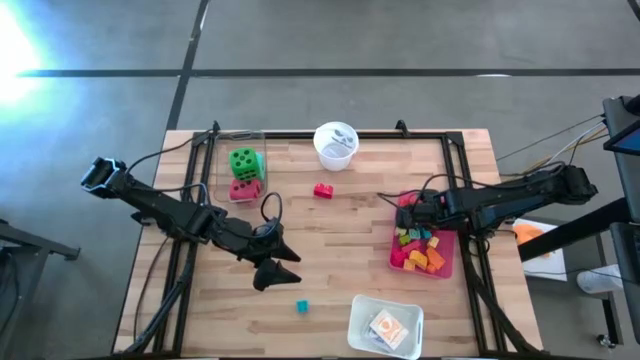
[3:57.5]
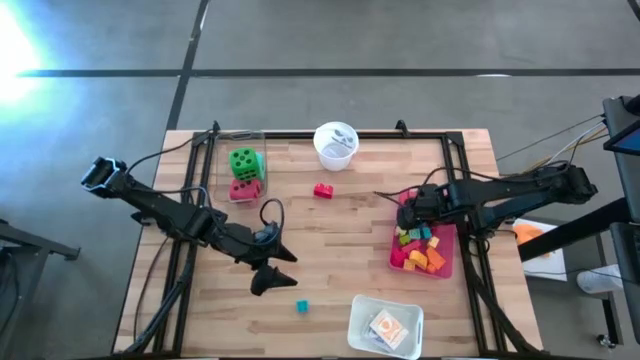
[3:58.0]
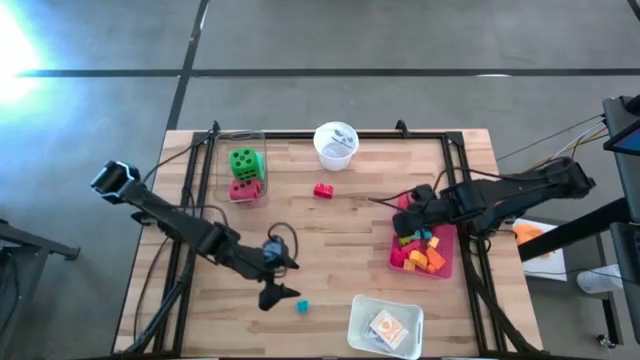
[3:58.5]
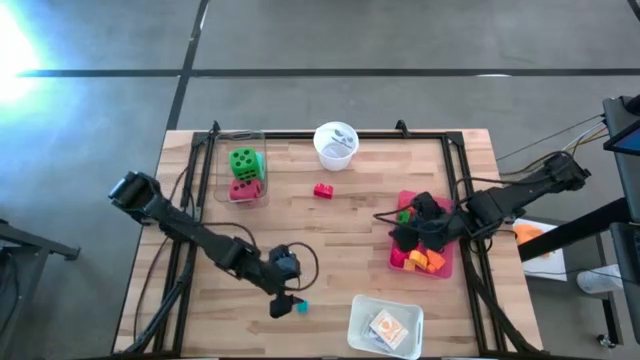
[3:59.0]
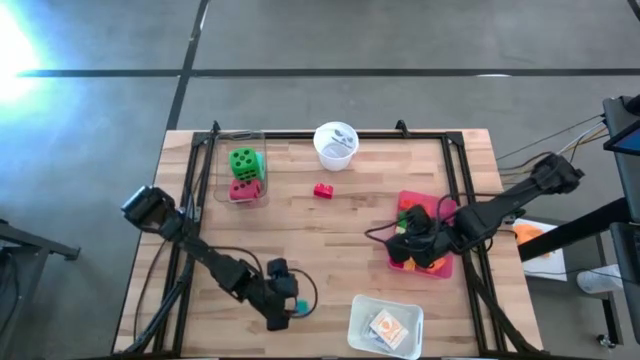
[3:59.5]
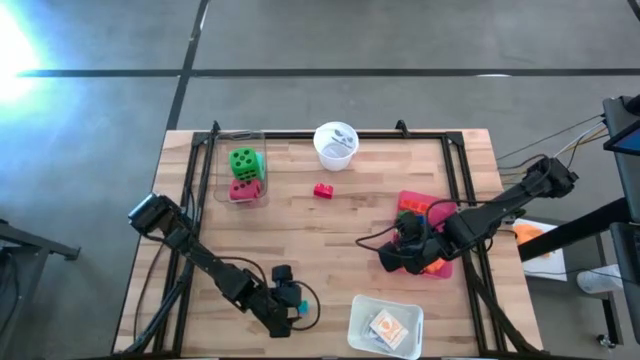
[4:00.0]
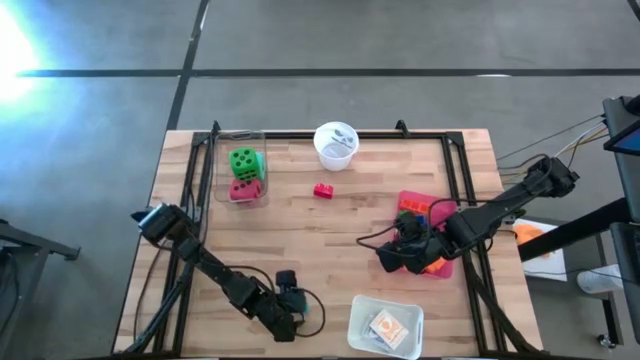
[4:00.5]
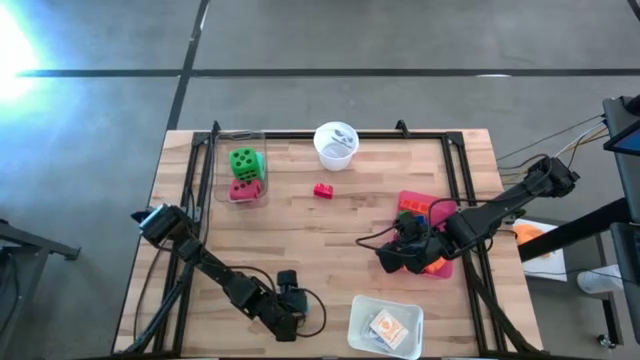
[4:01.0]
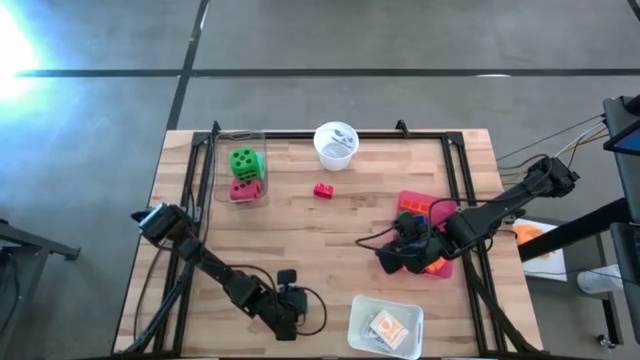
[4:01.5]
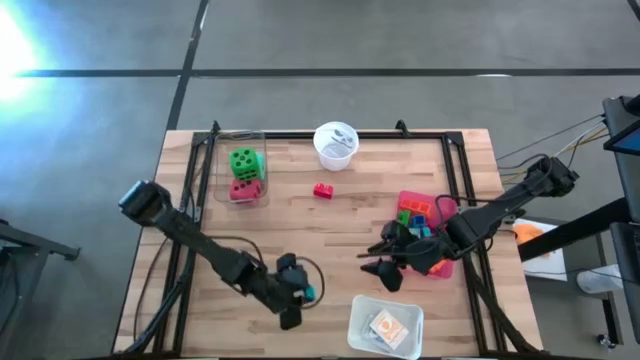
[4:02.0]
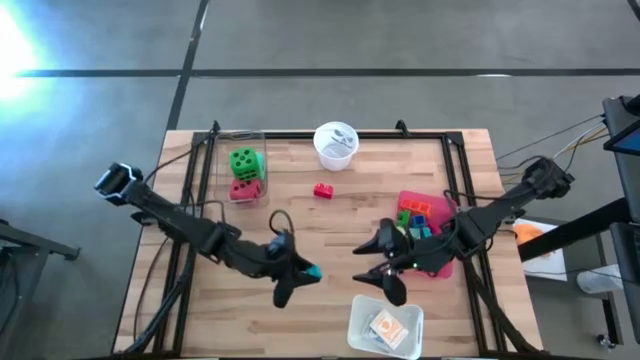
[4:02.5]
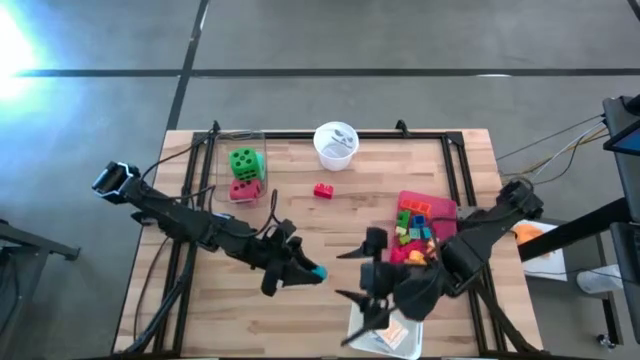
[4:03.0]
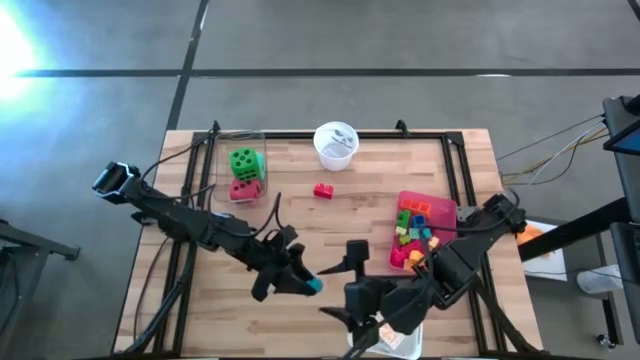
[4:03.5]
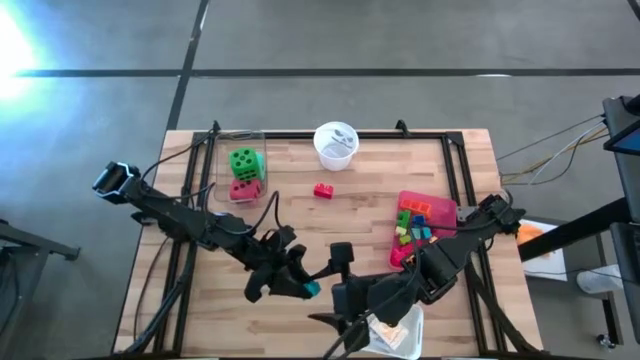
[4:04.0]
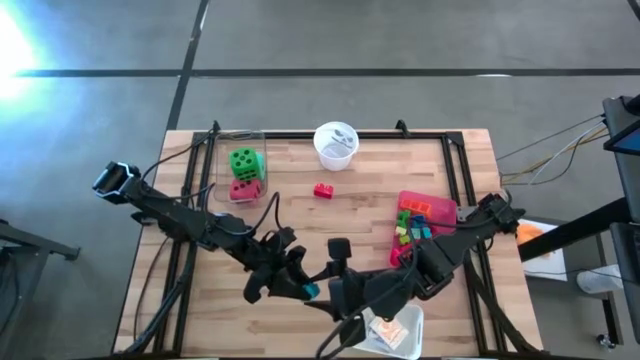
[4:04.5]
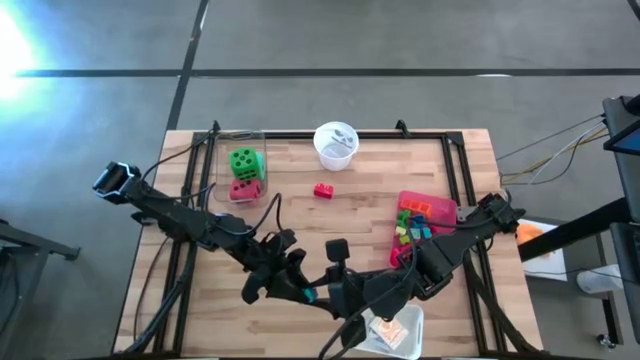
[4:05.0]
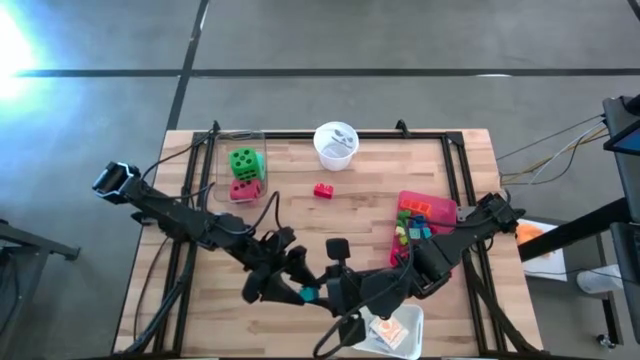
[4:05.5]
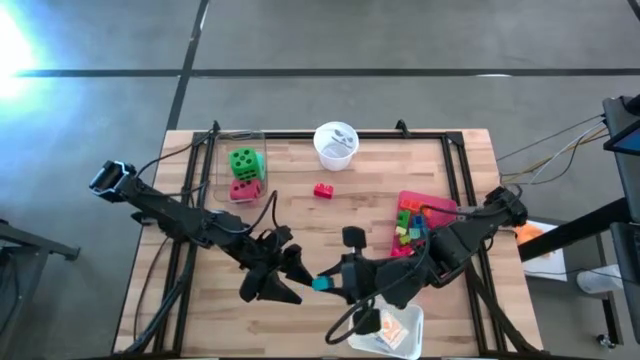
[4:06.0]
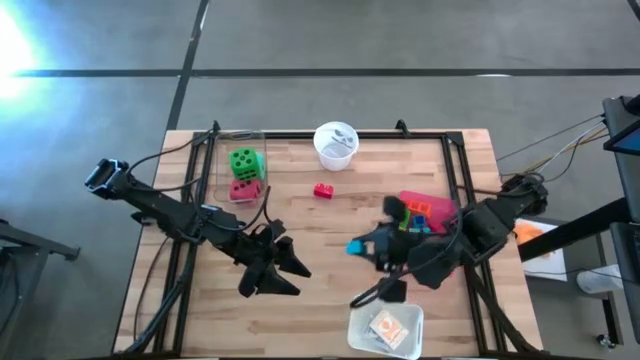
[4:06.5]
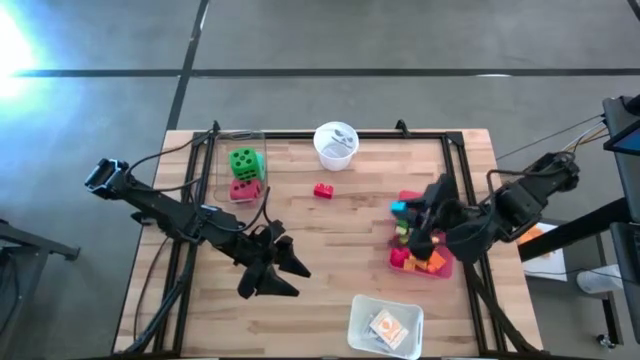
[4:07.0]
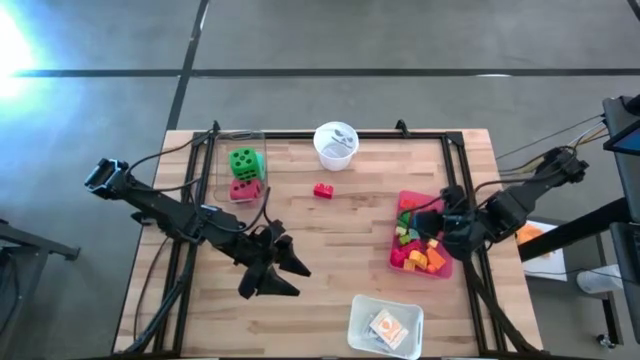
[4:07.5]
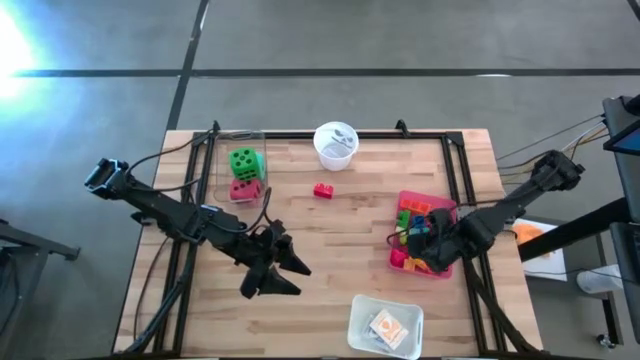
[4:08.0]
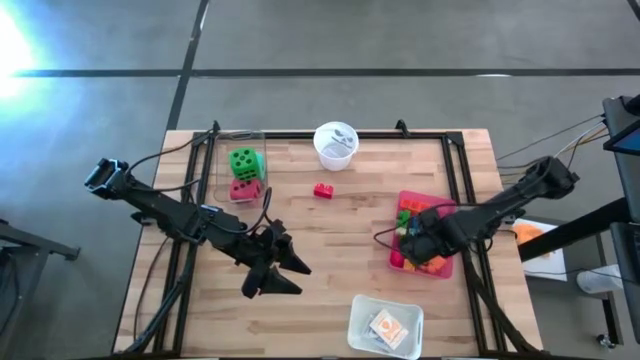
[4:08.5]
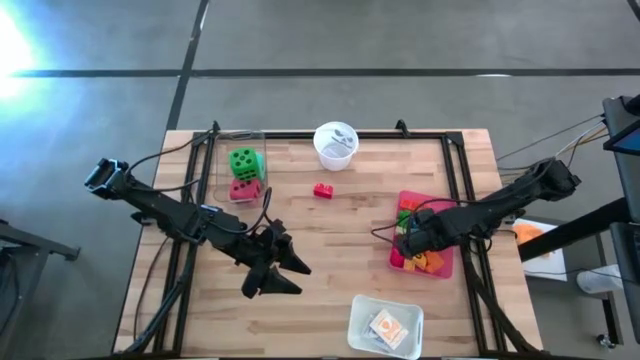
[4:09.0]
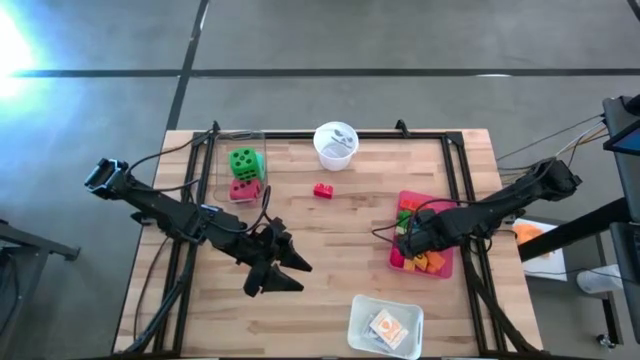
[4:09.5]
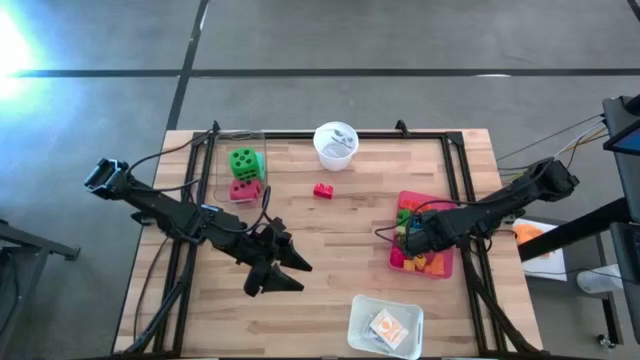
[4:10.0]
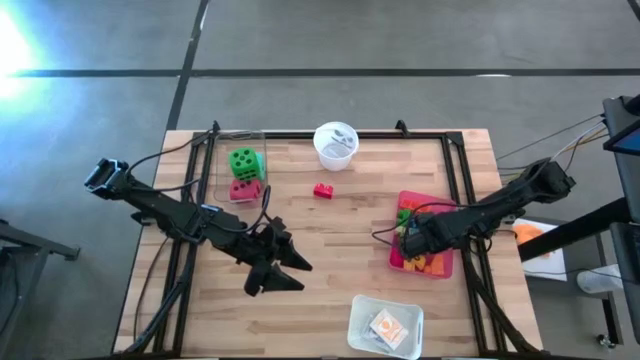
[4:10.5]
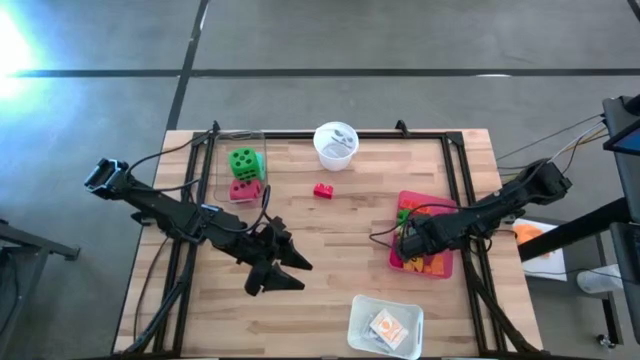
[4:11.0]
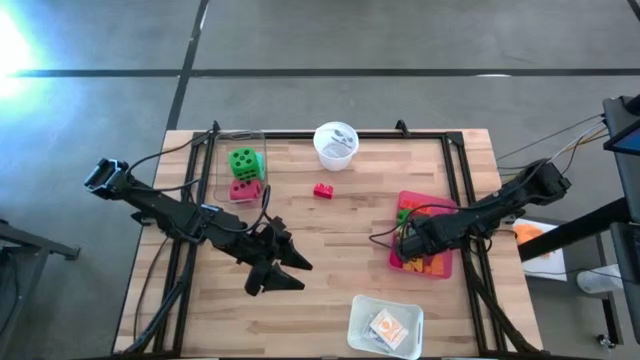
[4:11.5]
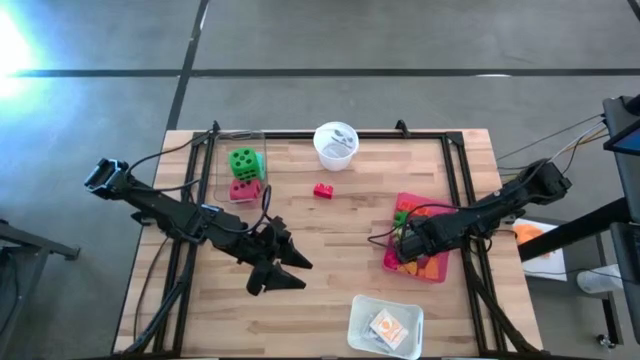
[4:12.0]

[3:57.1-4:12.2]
Task: Pick & Place Toys
Put the light blue game piece into the pink bin

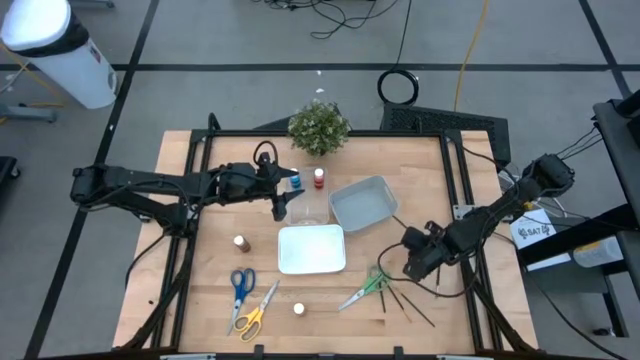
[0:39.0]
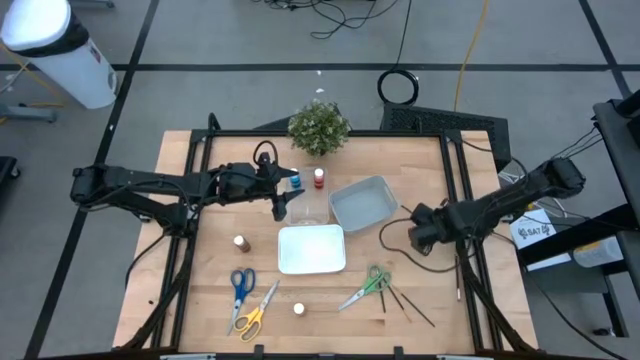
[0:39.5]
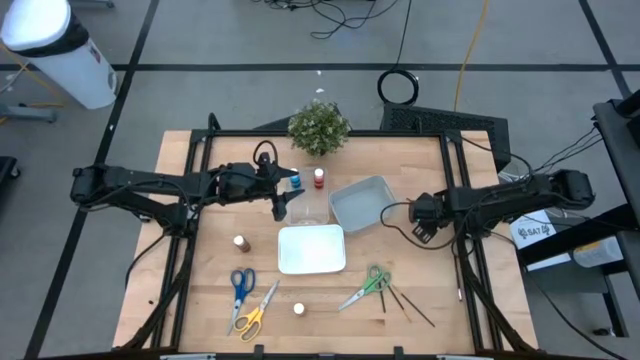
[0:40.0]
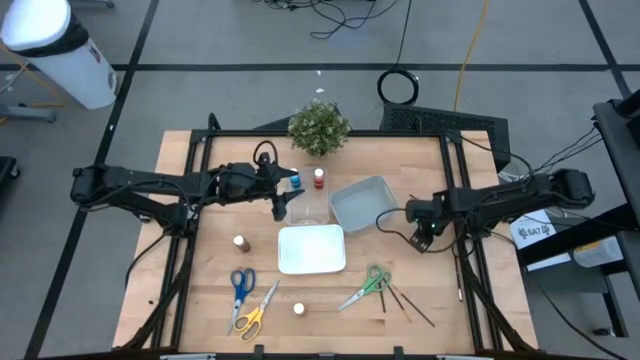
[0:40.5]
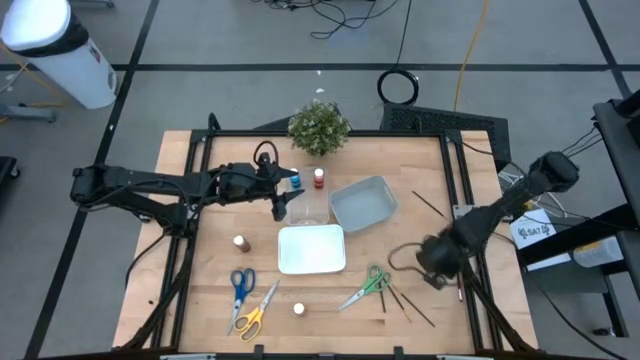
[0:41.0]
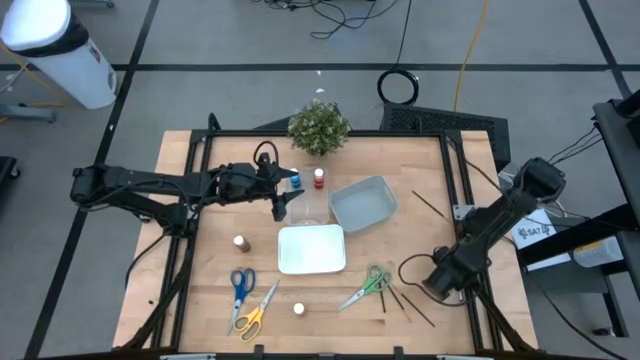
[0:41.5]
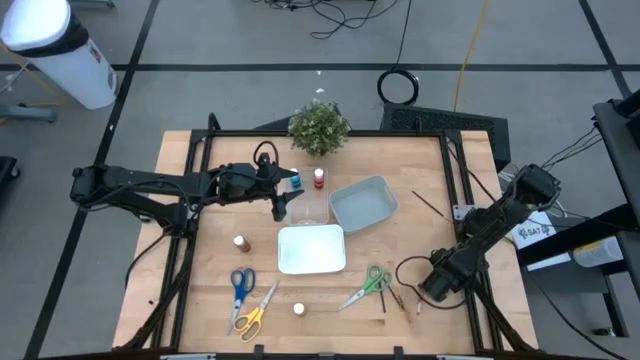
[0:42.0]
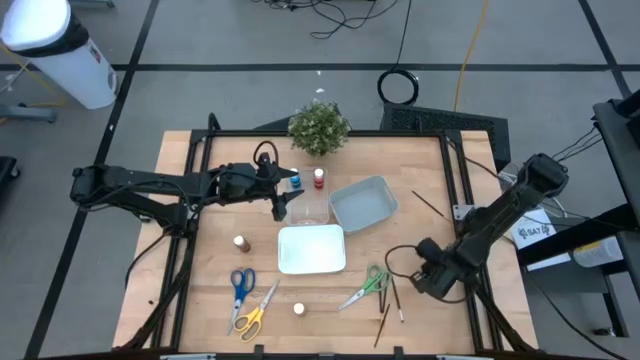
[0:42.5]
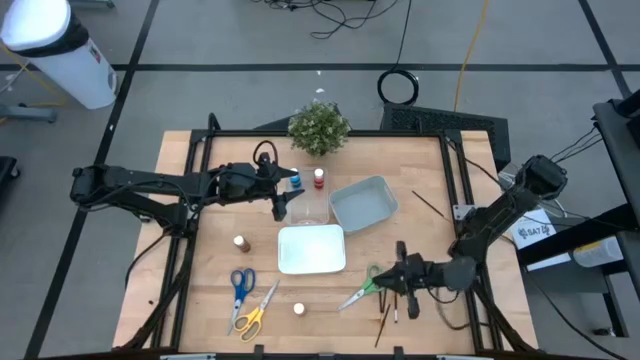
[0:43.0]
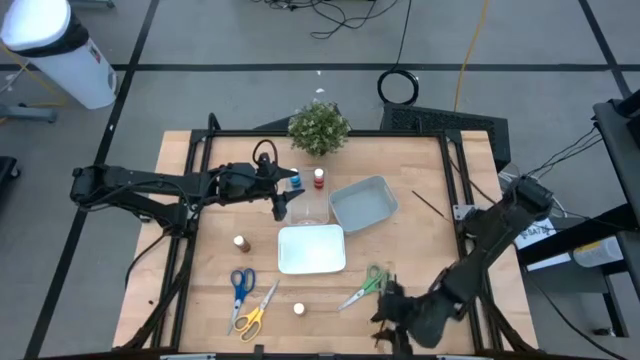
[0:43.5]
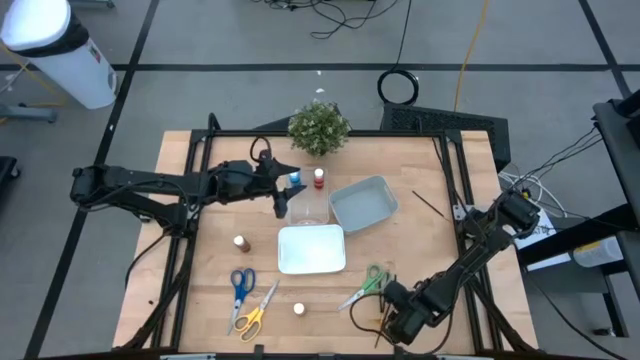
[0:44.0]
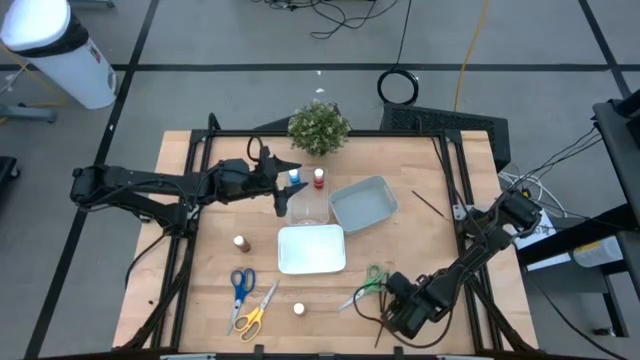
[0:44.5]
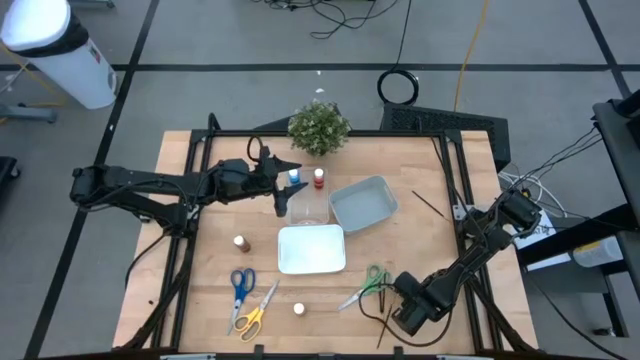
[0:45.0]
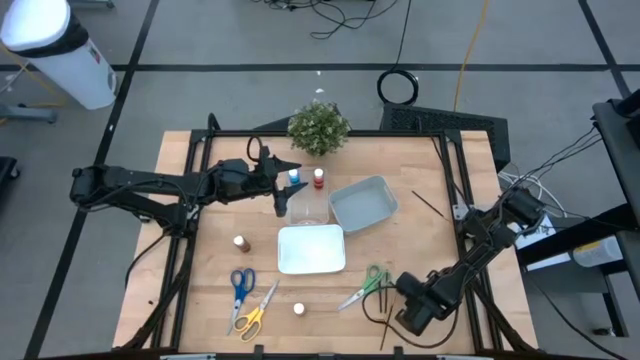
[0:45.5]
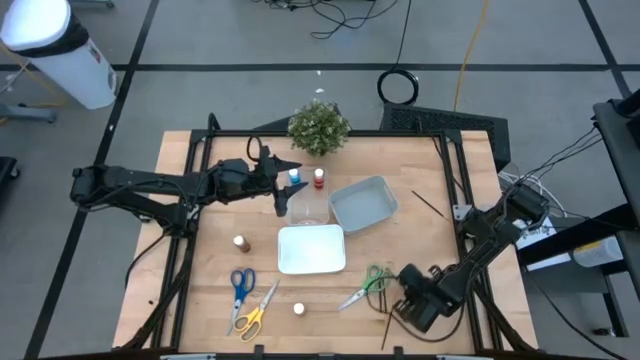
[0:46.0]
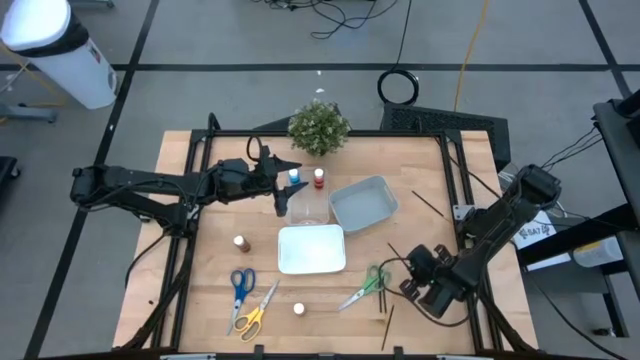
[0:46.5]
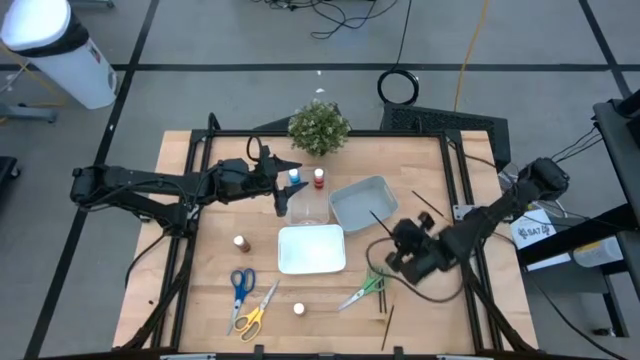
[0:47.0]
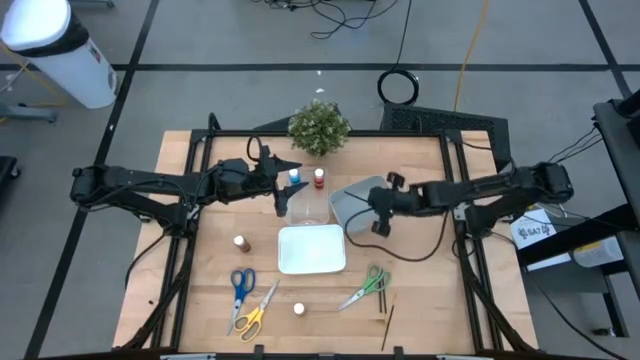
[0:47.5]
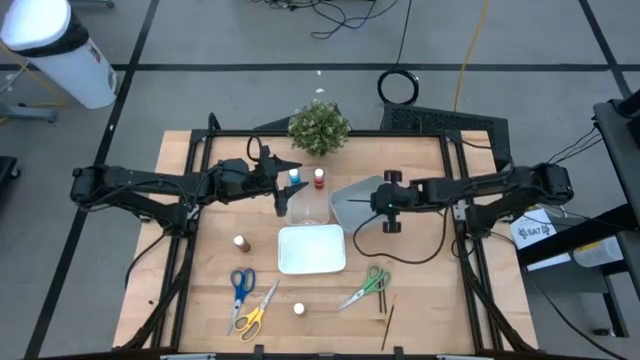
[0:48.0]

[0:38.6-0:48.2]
Task: Pick & Place Paint Supplies
Put the silver paintbrush into the gray bin
